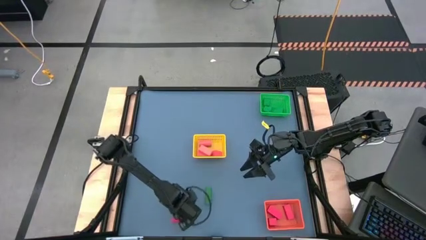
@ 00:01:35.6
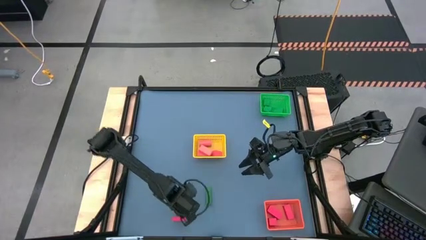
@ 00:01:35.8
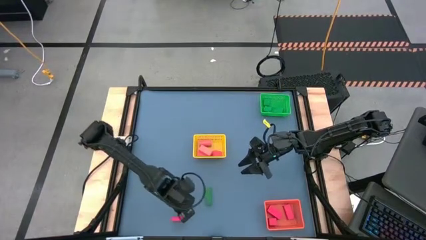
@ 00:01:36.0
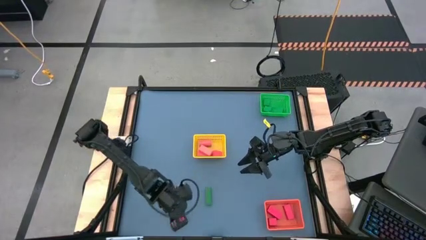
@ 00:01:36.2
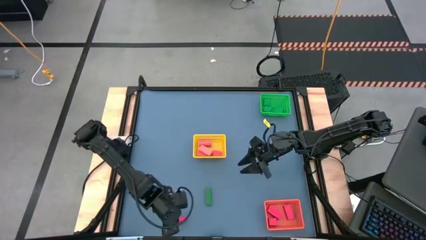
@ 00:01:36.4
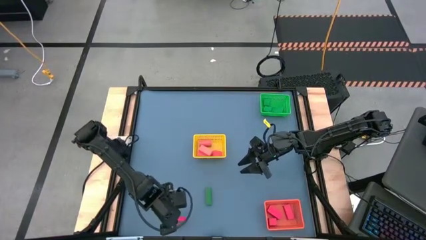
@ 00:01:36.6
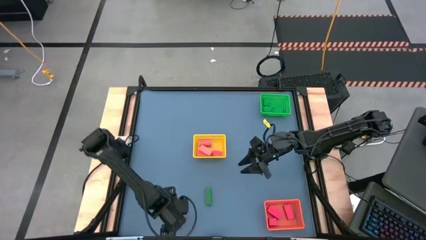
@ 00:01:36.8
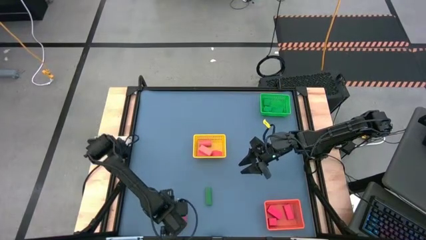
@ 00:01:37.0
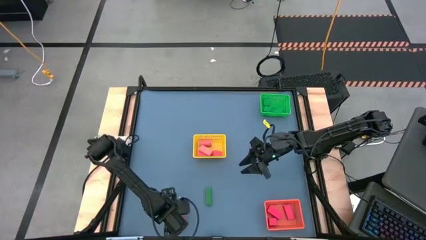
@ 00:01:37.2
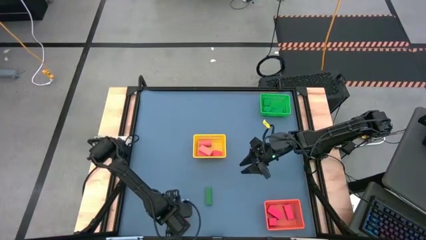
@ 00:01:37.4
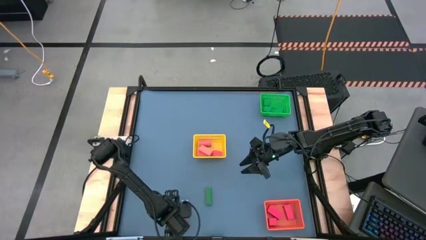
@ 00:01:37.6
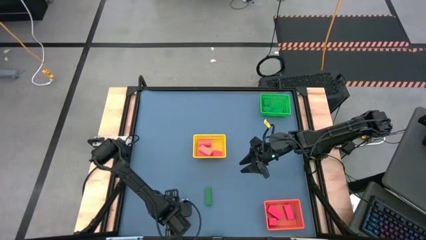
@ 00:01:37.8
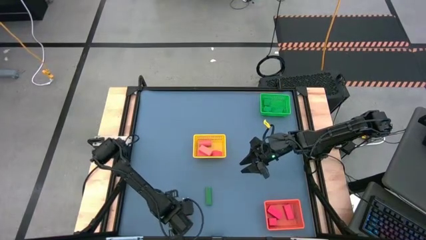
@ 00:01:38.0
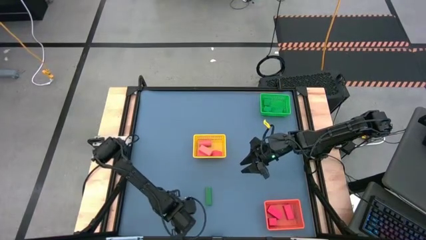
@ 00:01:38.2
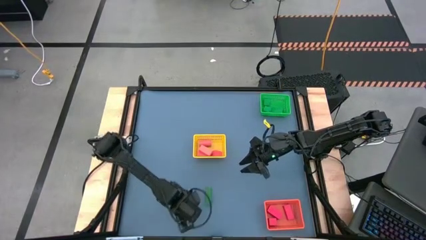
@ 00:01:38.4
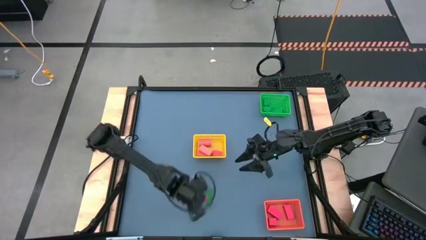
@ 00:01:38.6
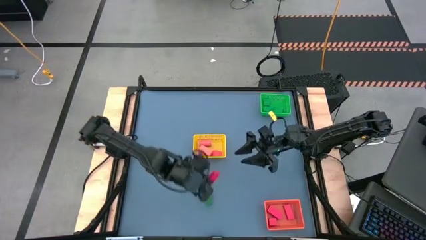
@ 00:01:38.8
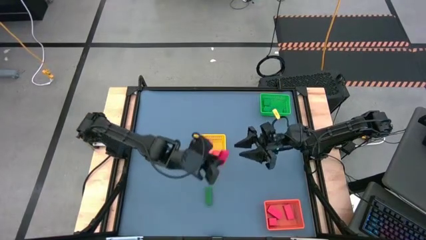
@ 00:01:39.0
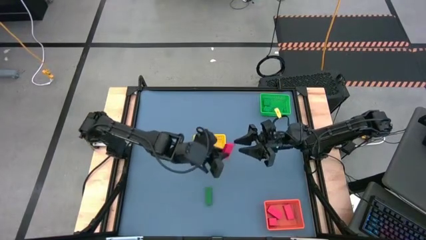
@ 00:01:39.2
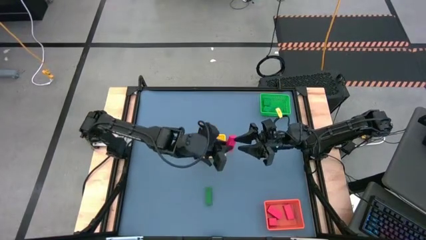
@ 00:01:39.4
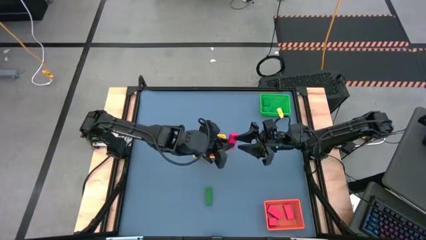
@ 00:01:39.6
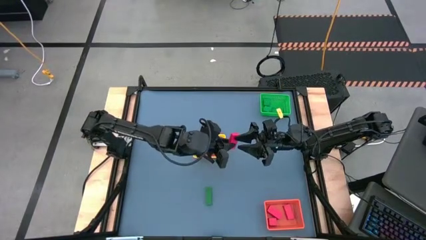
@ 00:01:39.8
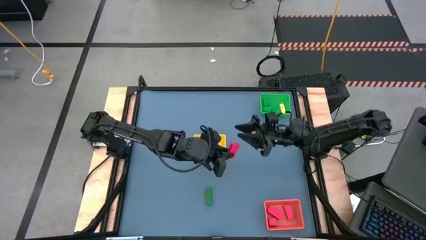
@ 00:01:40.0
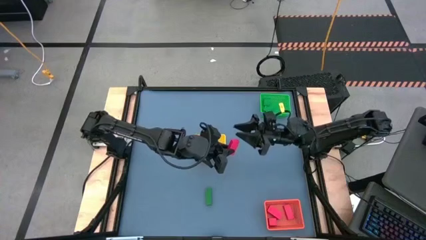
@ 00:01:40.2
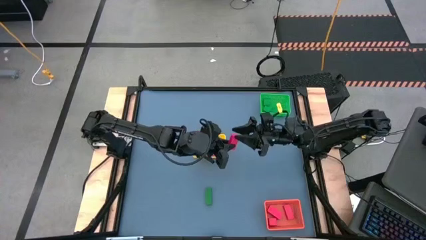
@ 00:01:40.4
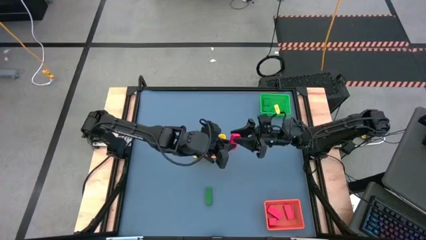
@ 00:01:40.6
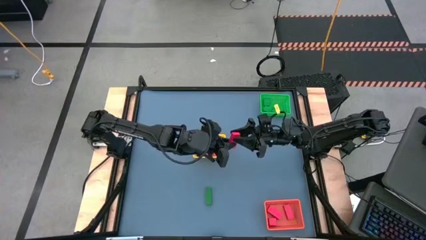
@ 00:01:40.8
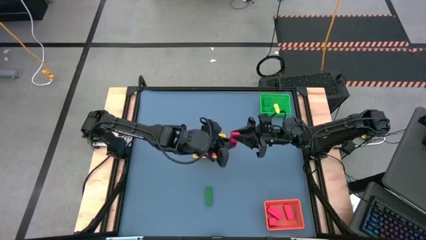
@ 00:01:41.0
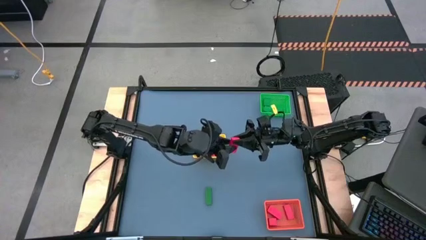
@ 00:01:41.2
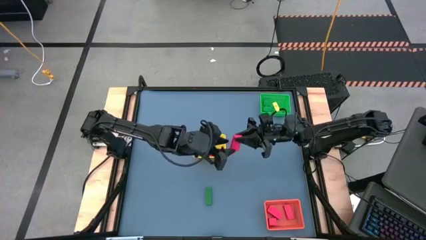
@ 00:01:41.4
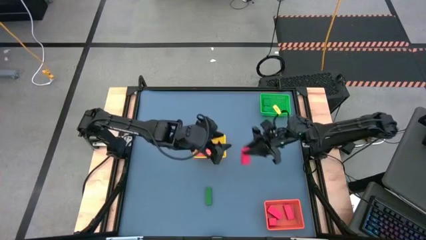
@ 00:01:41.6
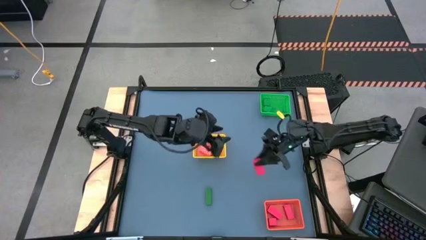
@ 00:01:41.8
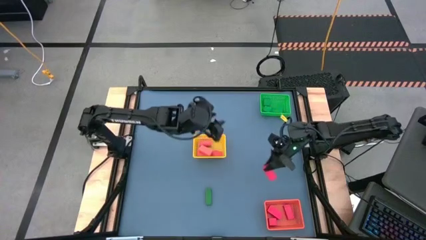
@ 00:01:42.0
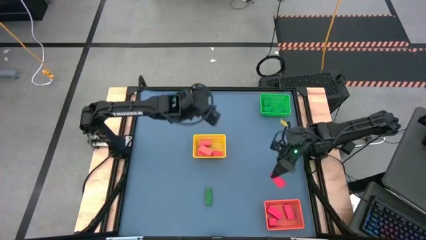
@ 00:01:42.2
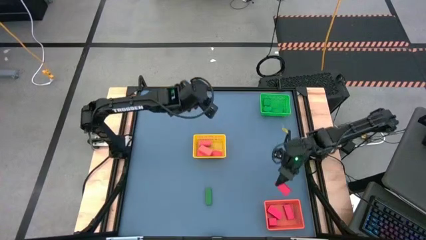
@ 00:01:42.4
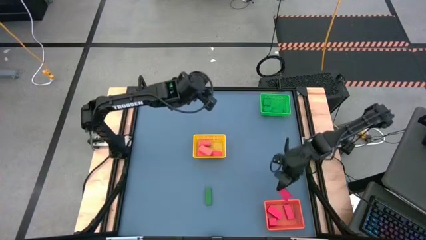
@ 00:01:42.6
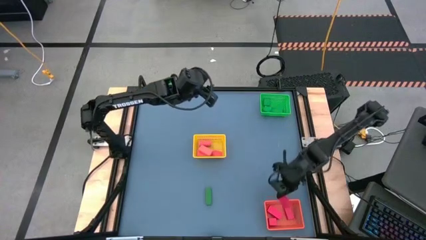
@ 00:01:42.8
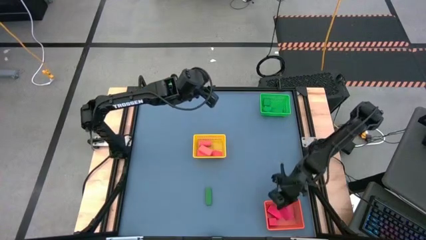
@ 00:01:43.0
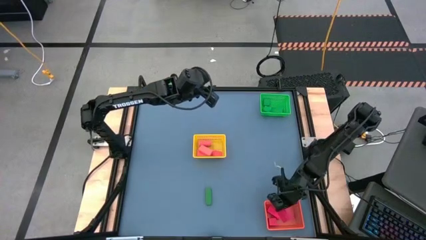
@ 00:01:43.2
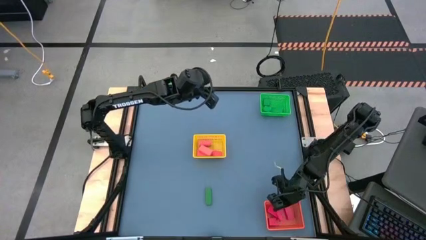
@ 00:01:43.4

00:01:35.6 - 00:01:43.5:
Task: Sort & place blocks by color
Put the red block into the orange basket

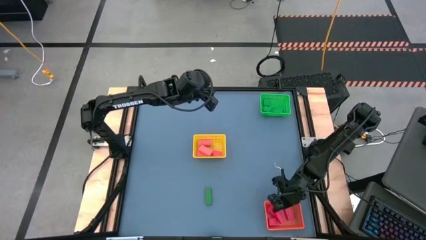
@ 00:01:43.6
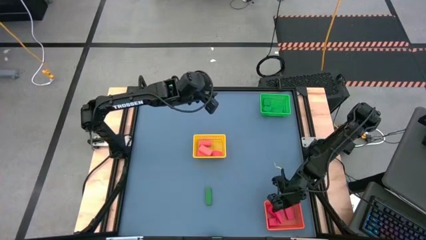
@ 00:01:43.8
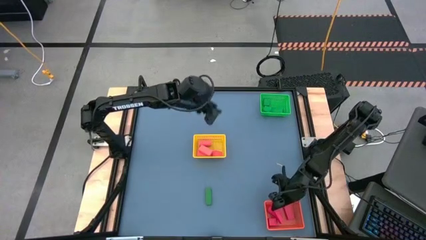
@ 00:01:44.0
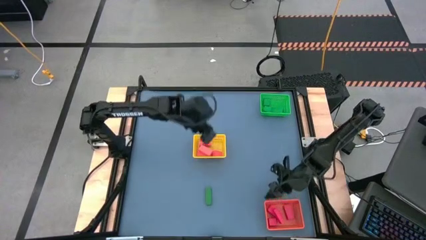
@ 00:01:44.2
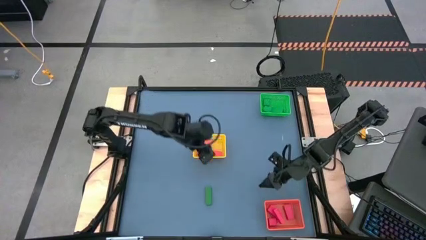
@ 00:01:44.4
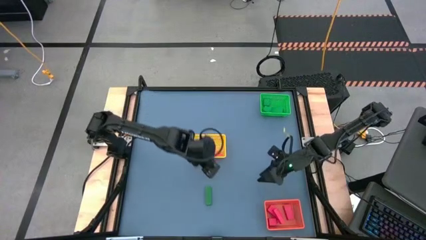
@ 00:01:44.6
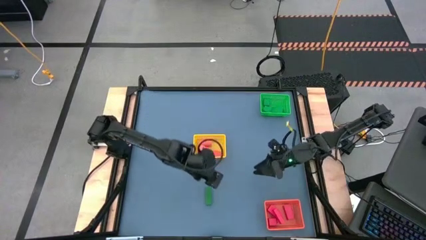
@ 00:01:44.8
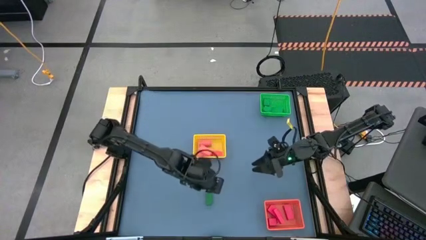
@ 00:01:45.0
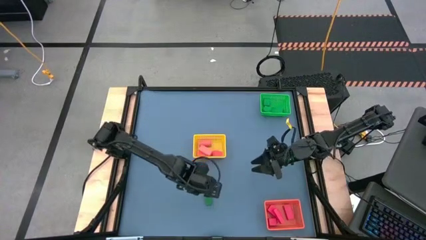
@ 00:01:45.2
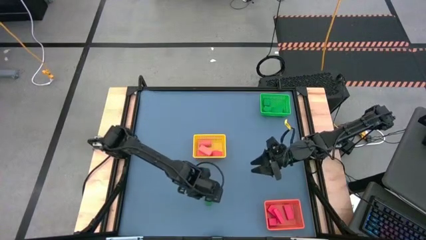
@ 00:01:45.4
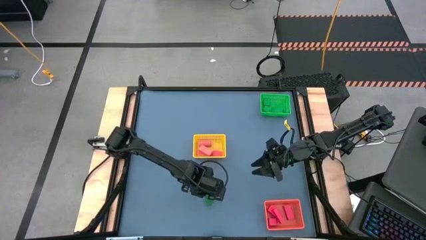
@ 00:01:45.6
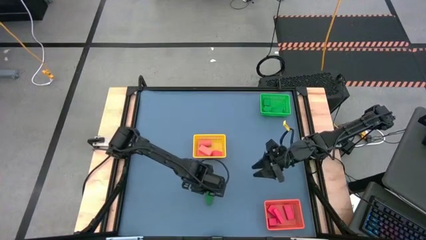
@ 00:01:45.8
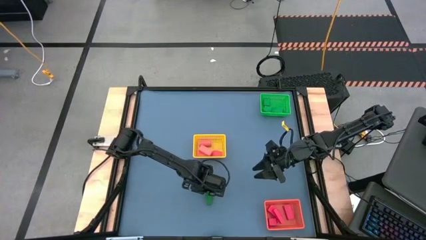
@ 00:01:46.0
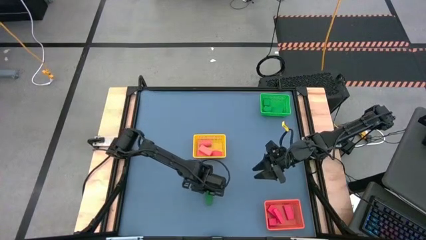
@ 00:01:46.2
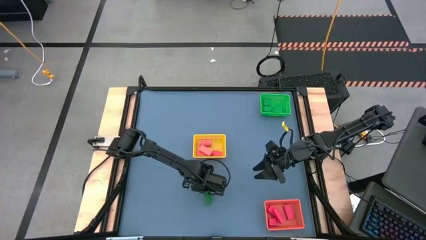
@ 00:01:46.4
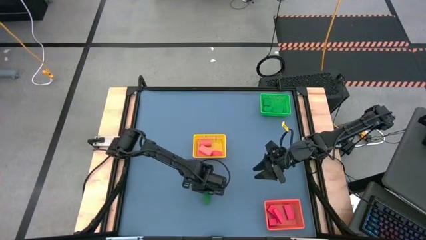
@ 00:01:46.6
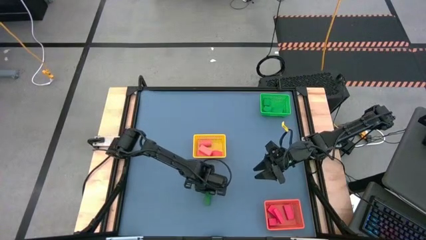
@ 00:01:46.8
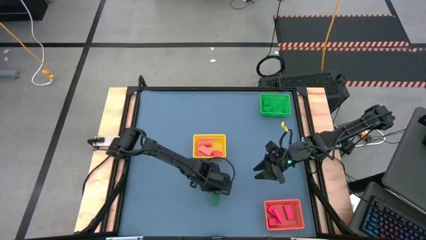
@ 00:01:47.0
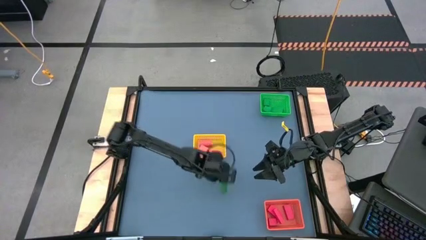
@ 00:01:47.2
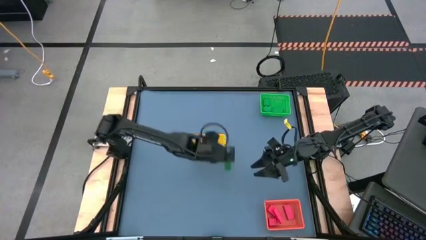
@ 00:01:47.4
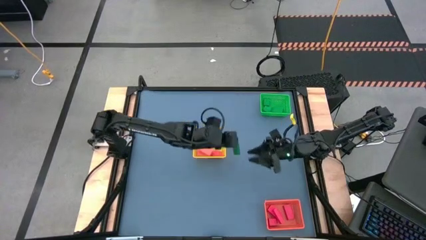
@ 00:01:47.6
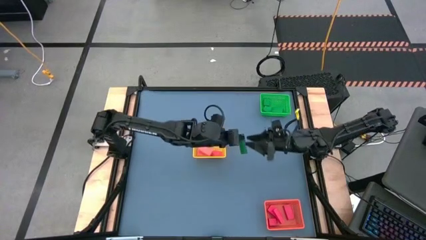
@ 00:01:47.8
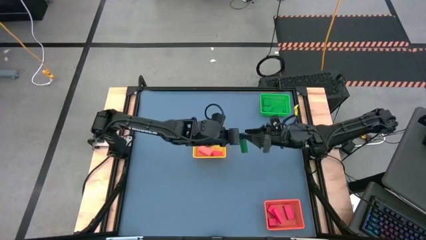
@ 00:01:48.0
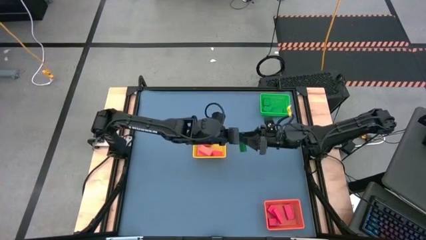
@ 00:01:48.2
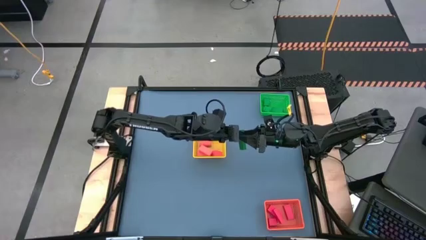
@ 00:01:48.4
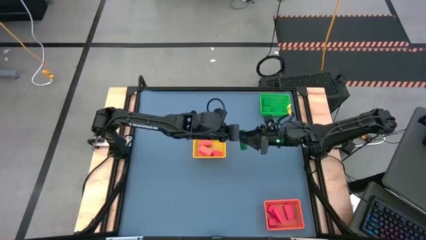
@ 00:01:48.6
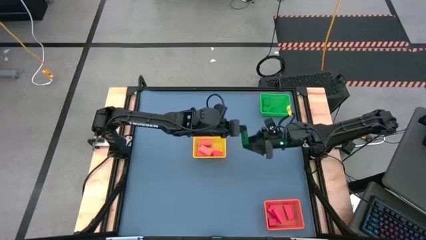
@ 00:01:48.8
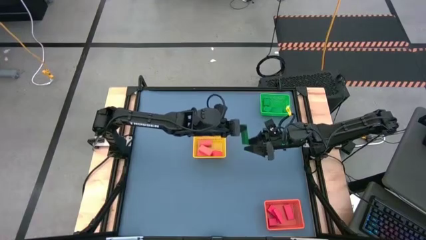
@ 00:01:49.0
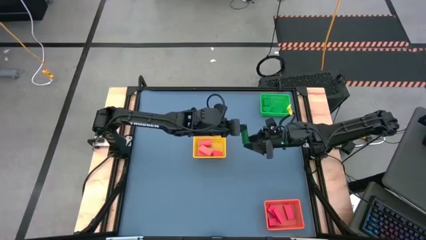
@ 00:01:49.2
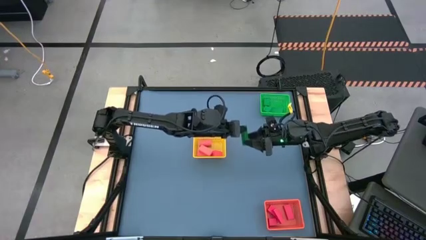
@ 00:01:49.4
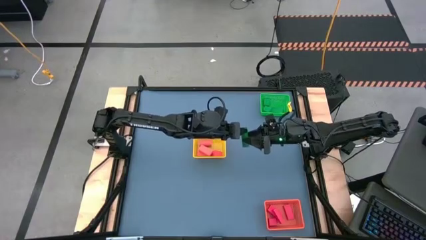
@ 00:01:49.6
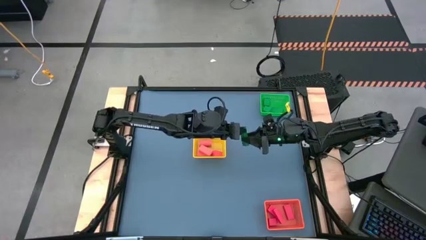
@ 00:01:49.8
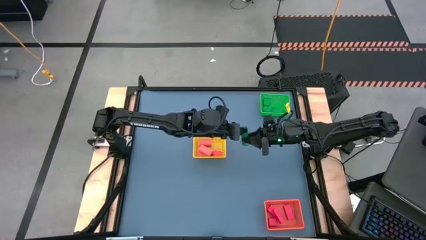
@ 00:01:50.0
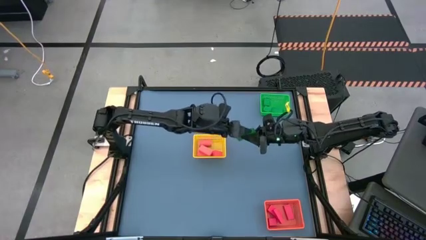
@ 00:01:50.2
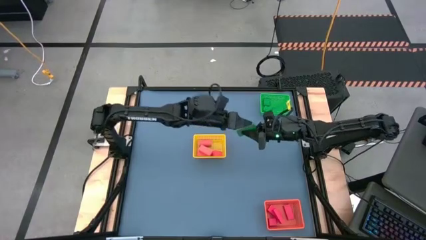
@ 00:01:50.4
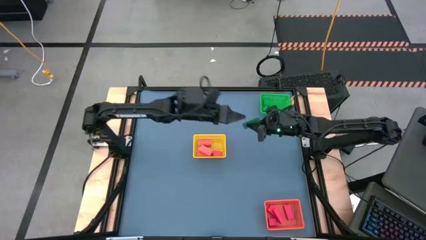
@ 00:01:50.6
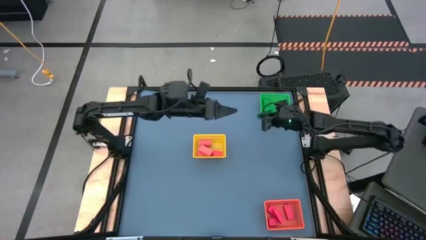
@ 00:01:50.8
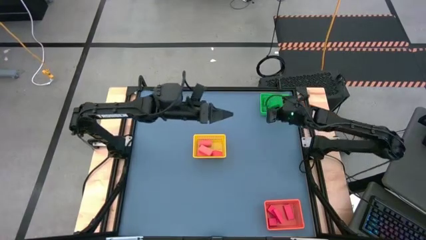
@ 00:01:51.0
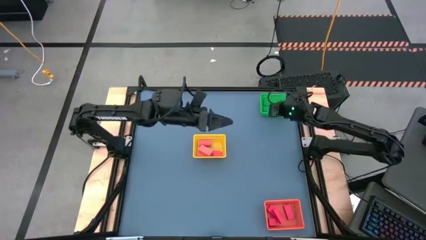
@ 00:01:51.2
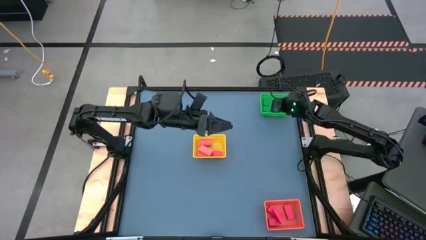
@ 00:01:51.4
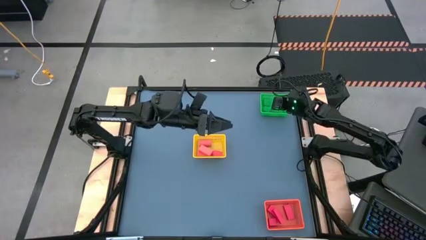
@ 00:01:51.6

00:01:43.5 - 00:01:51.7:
Put the green block into the green basket
